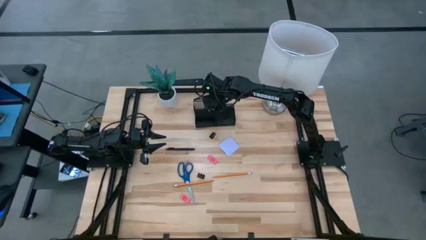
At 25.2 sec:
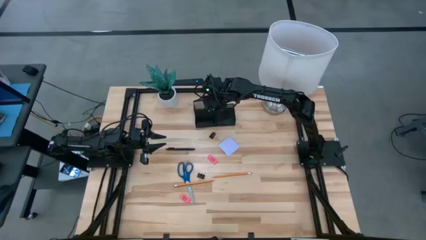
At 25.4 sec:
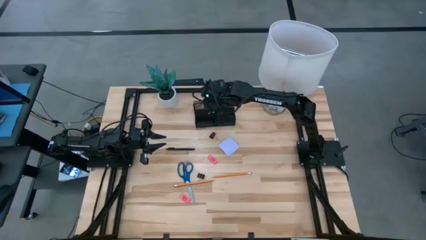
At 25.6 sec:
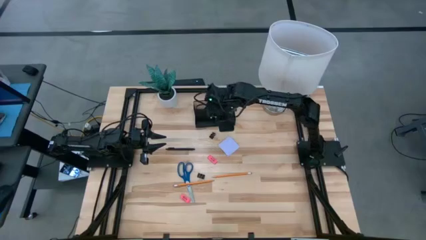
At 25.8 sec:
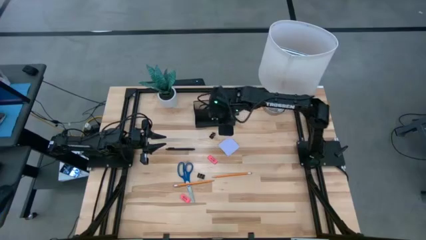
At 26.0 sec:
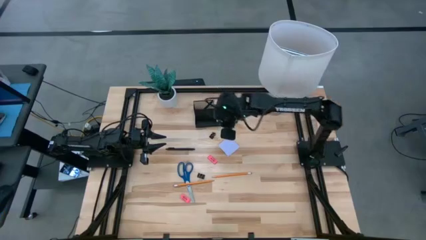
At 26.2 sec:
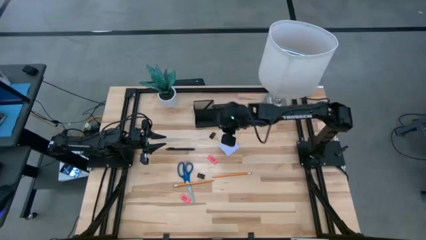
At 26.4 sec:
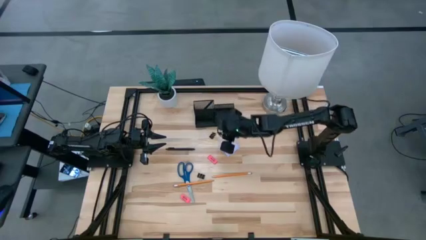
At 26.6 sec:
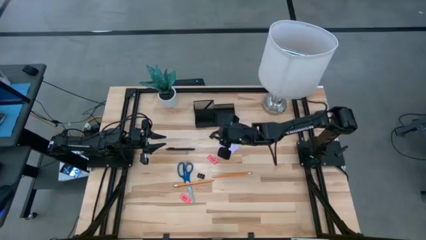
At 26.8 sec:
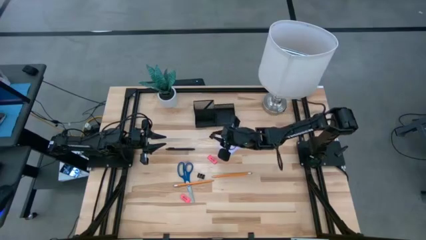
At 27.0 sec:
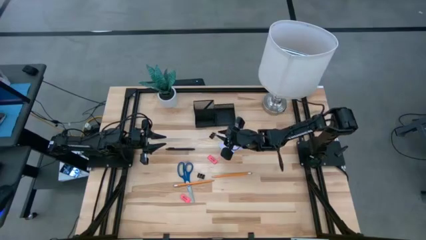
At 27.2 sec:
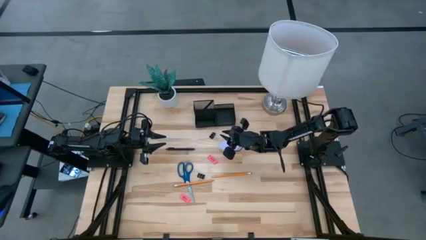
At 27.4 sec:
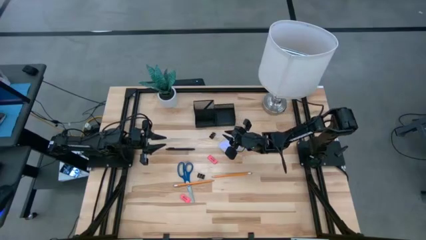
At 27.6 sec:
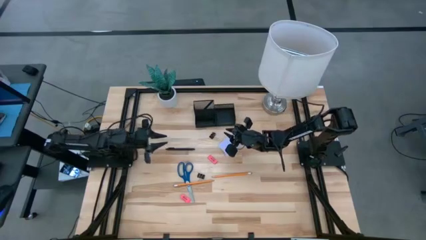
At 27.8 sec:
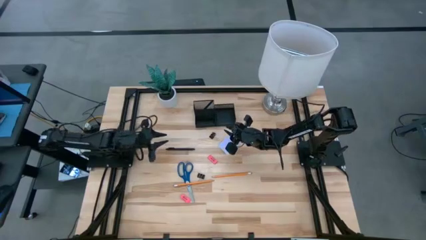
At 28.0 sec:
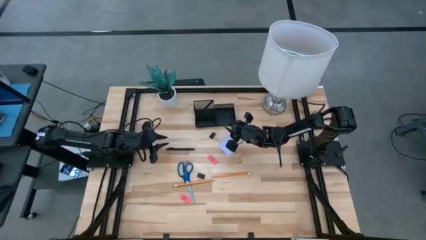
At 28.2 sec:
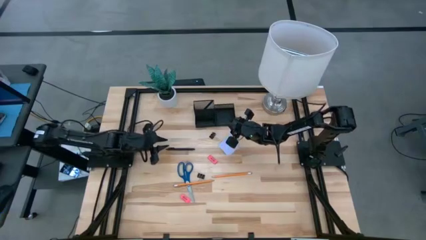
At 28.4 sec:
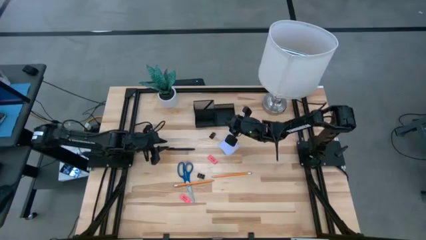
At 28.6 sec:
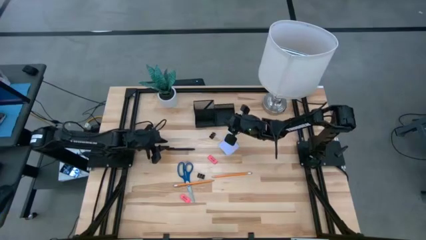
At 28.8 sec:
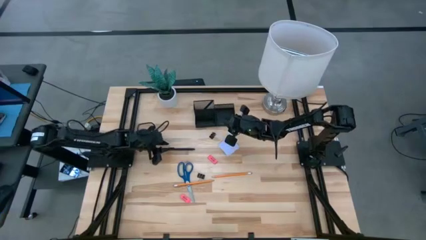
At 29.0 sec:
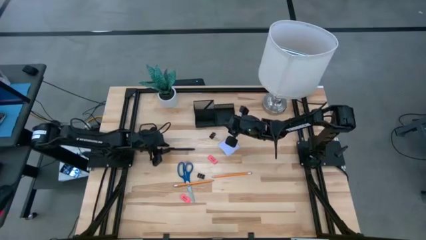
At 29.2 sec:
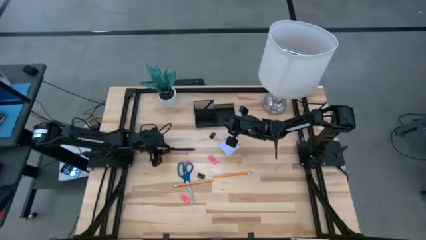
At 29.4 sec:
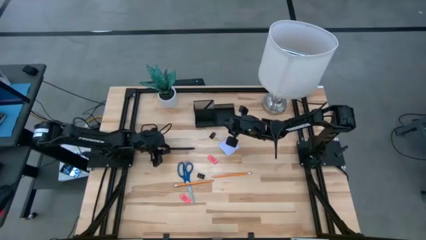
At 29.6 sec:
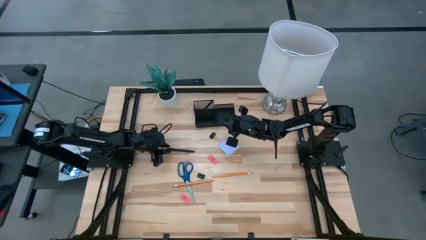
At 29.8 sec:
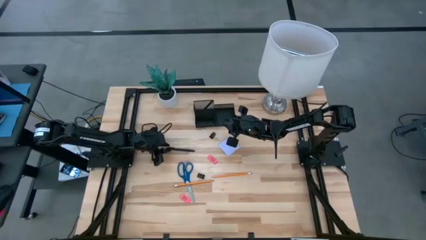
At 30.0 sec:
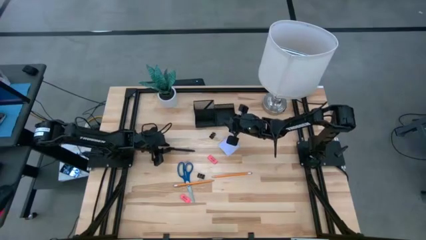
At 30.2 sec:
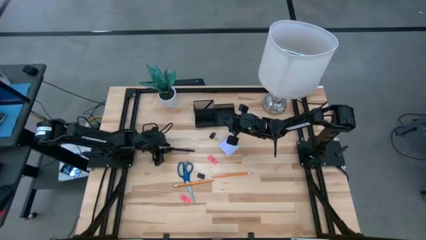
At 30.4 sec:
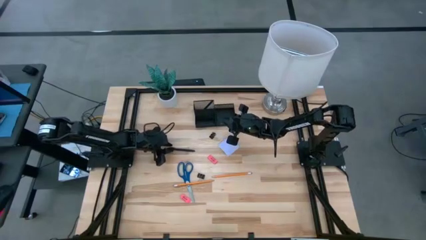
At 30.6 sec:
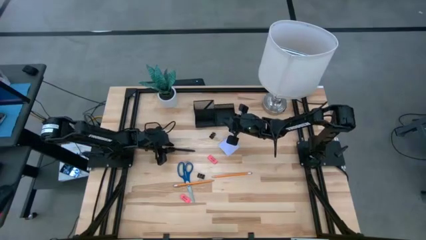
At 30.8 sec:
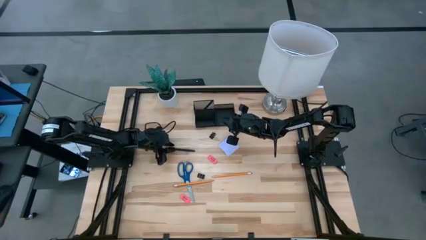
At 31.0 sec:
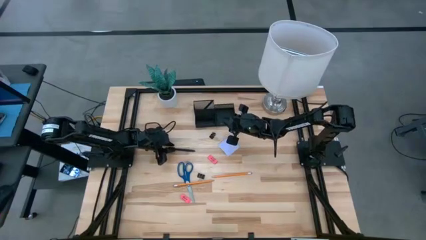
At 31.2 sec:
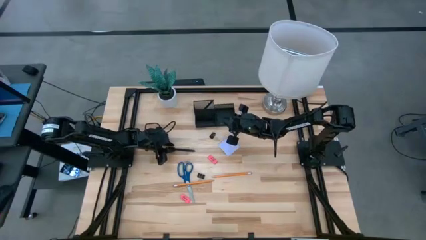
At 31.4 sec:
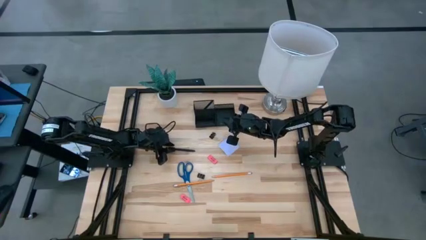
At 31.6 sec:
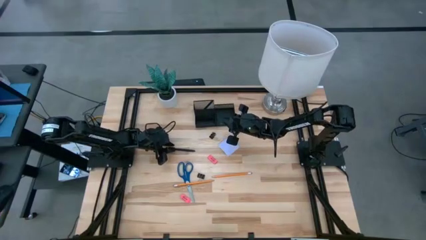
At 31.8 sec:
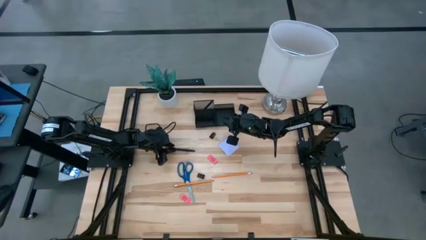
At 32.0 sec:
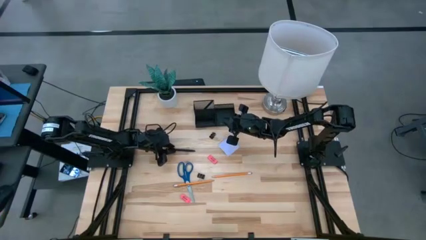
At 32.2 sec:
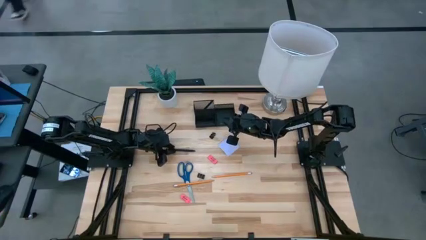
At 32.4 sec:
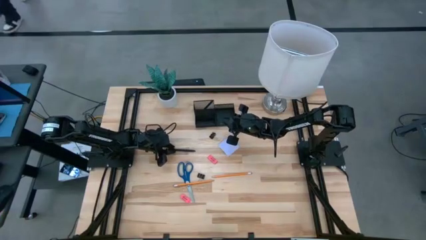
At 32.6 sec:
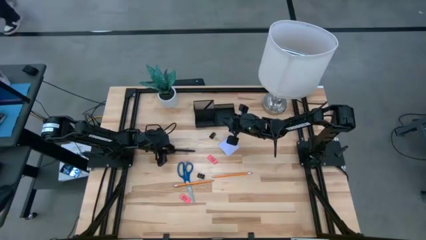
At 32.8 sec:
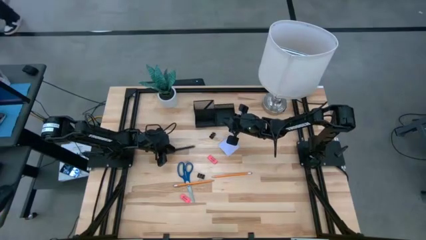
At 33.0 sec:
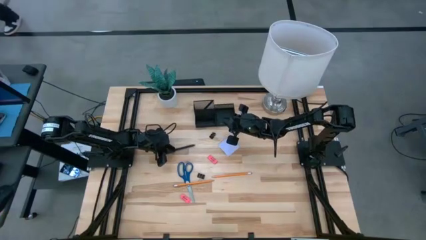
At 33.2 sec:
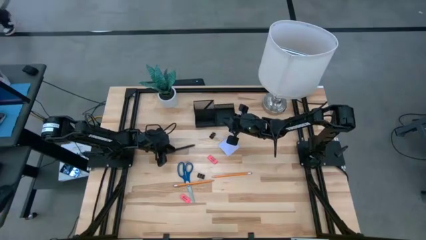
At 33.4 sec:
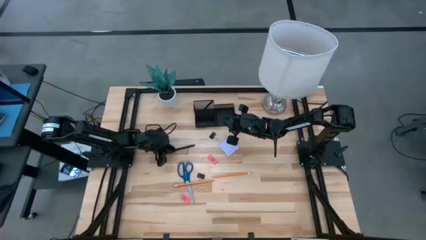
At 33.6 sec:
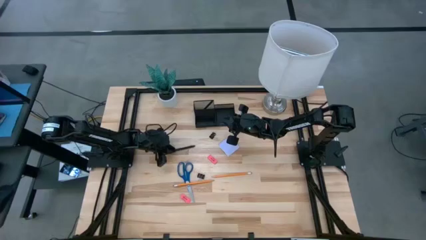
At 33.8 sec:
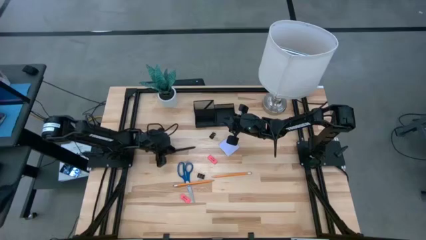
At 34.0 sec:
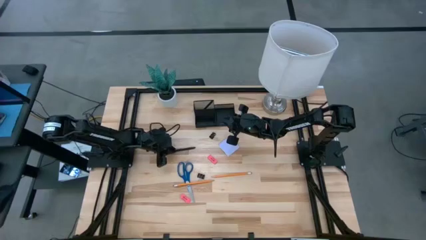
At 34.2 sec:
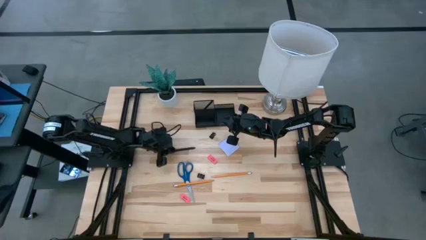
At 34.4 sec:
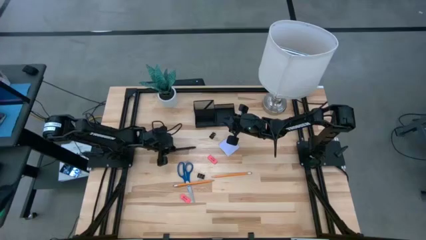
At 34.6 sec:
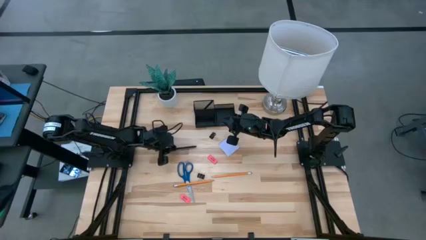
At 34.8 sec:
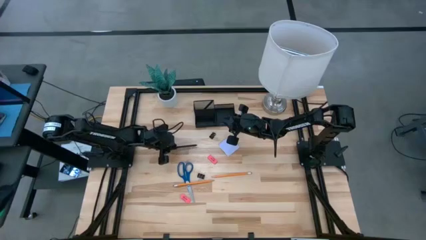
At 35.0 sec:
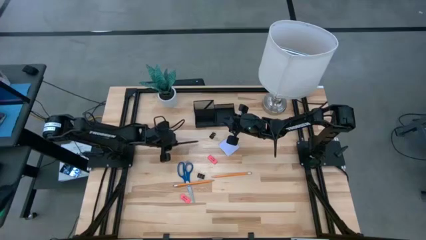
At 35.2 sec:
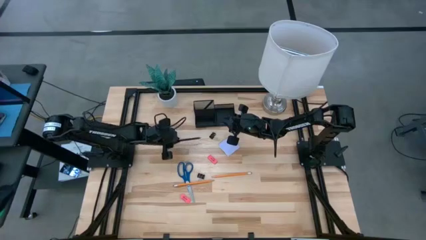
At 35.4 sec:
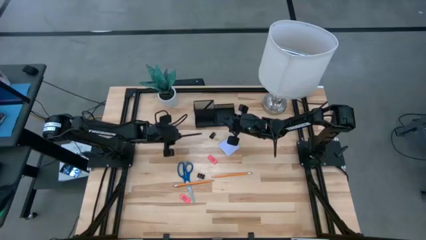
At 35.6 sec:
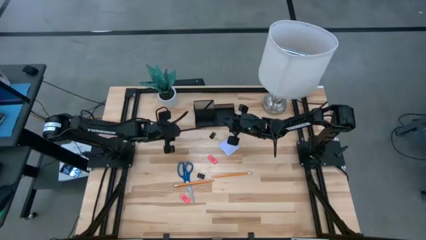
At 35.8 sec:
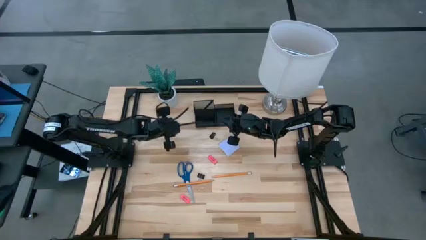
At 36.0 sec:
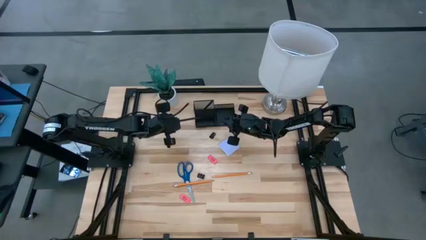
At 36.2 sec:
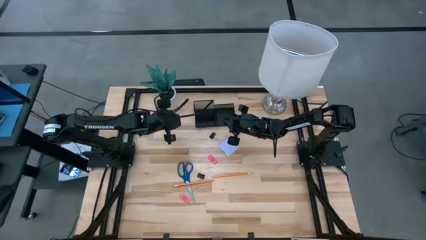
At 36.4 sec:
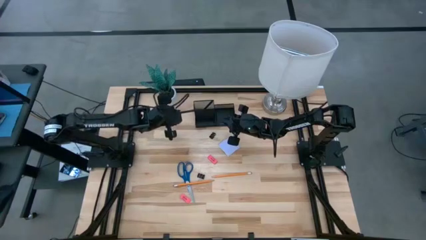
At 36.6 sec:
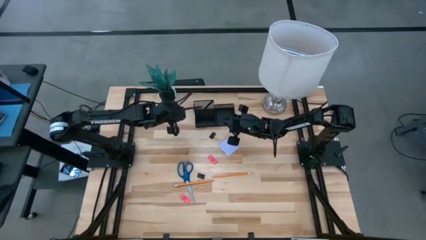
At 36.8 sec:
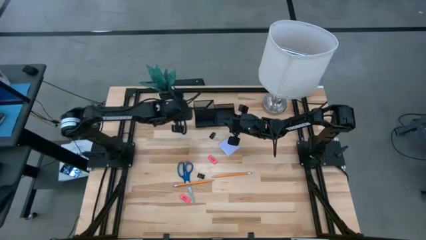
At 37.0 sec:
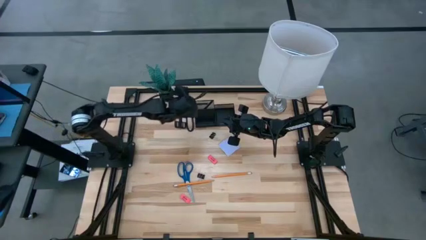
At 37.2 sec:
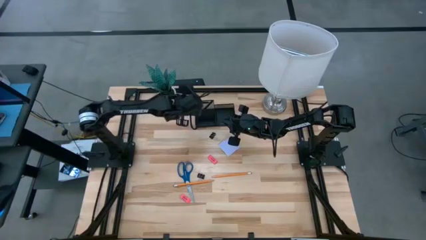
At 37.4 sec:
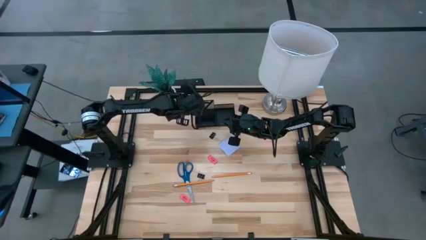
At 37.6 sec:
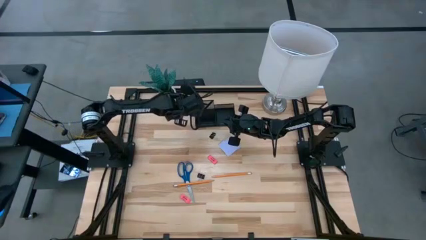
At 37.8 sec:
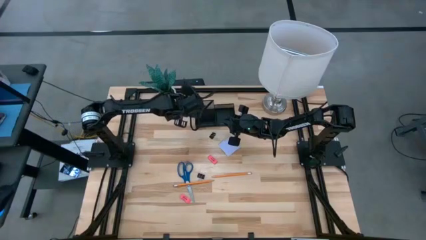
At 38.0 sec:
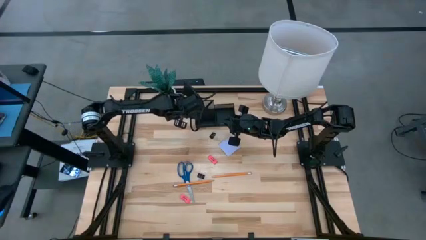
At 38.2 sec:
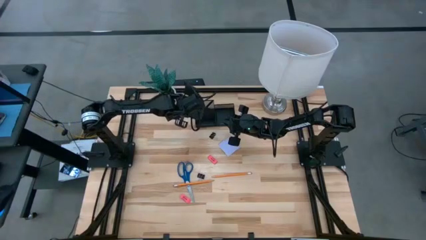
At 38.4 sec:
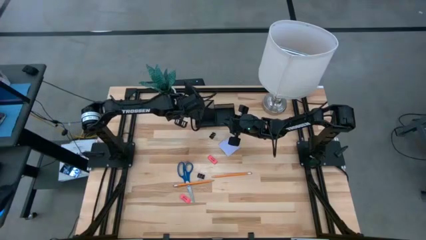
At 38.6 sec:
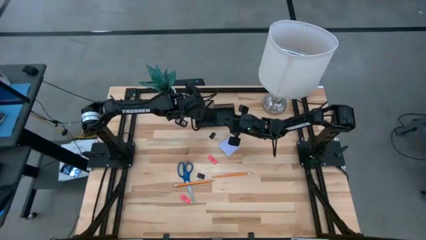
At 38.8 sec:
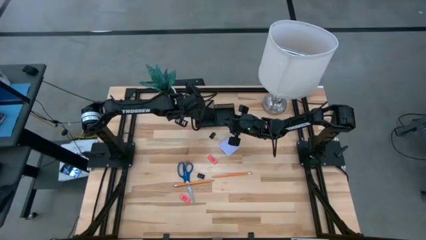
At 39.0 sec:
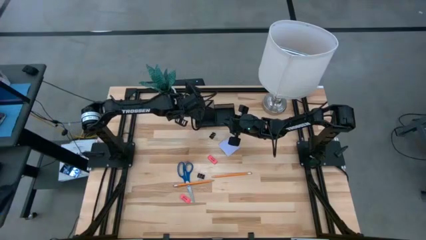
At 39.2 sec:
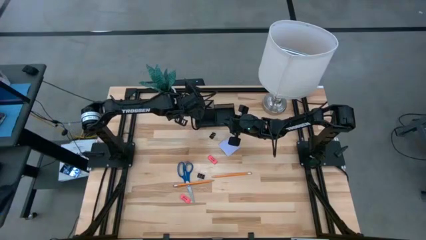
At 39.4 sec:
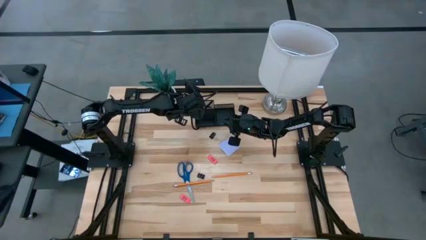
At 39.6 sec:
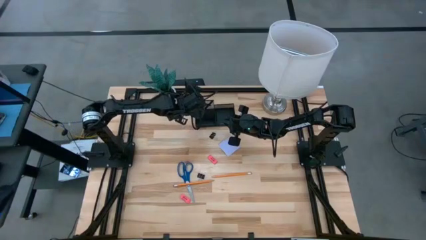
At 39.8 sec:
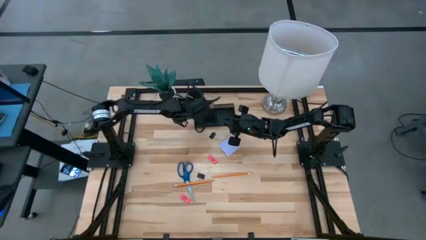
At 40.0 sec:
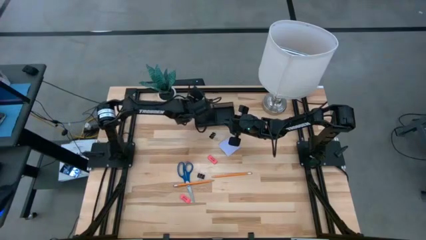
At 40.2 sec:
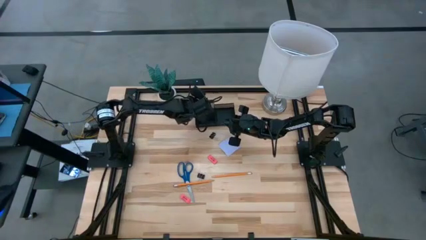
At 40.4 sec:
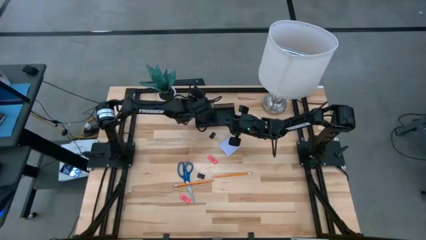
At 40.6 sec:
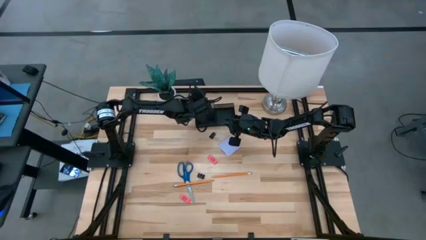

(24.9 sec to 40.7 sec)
Task: Pick and place office supplies into organizer
Put the black pen into the black desk organizer
